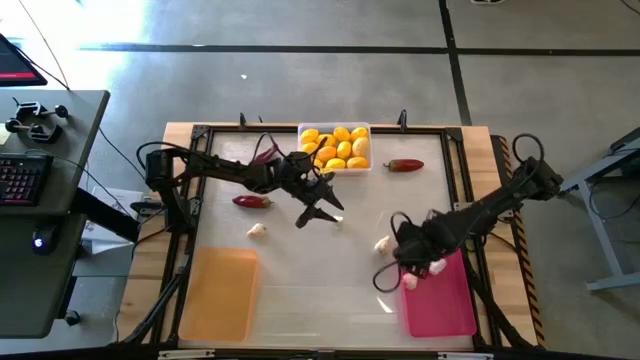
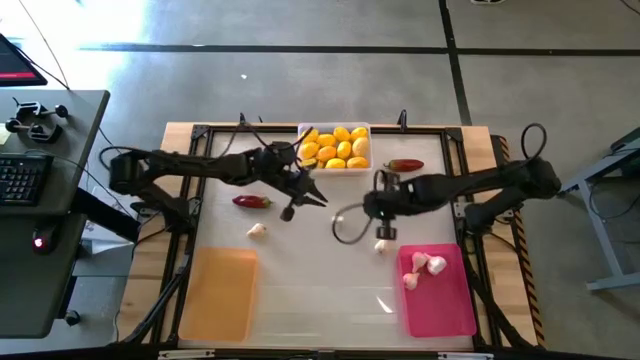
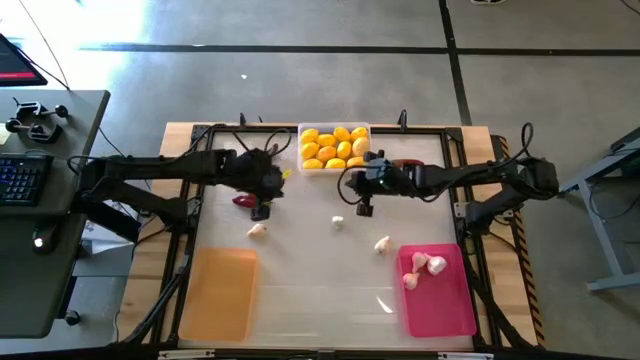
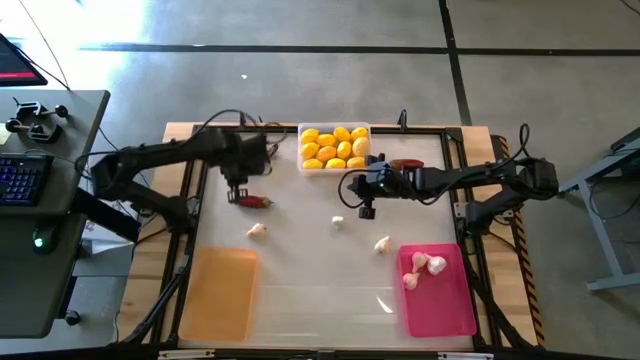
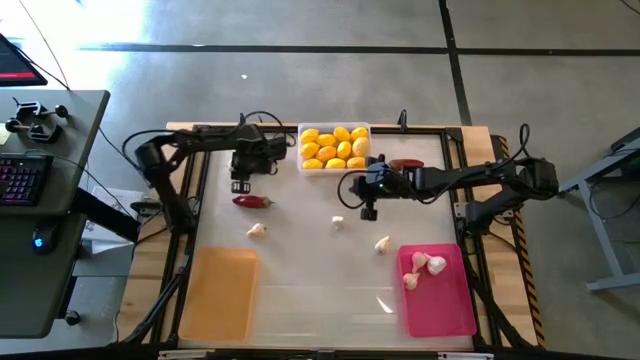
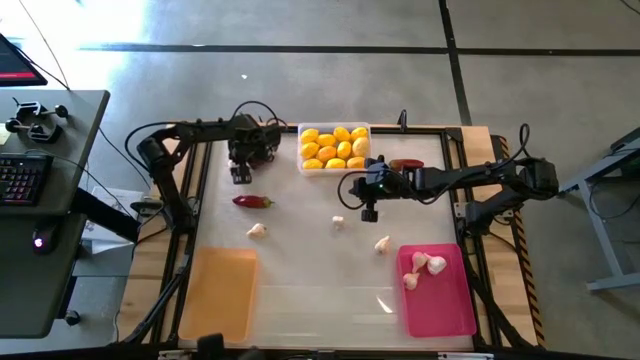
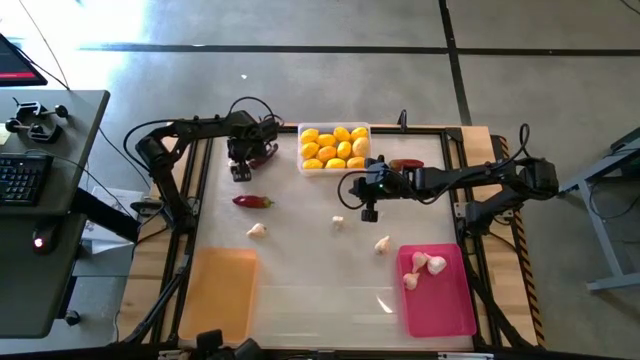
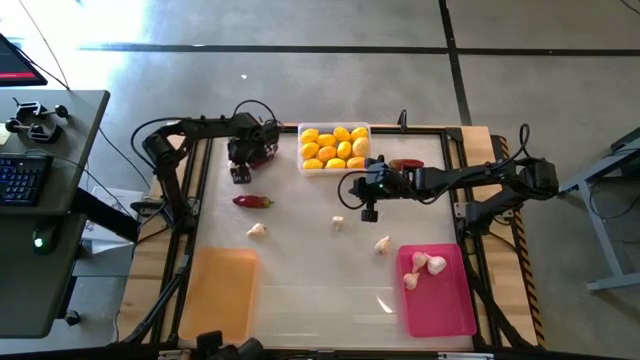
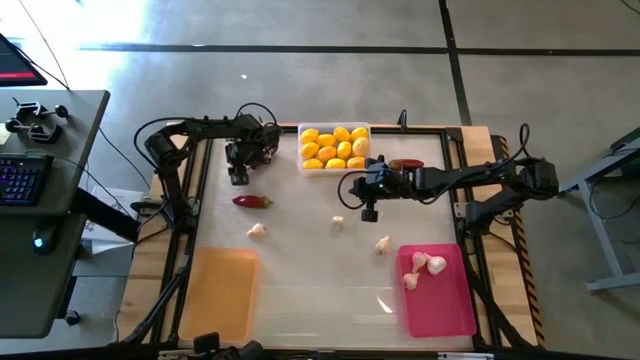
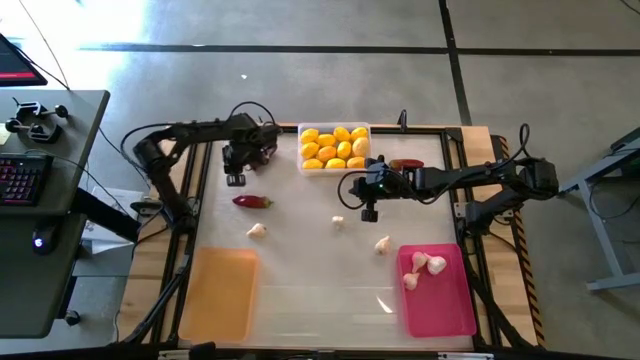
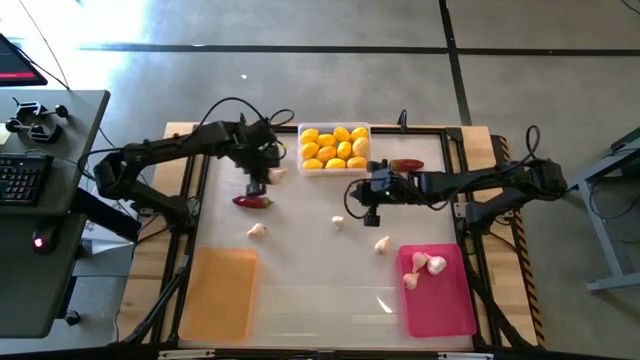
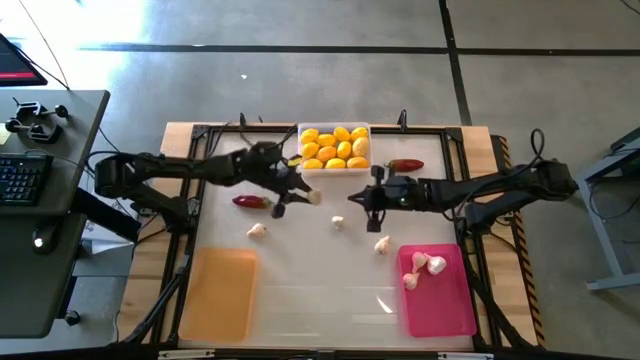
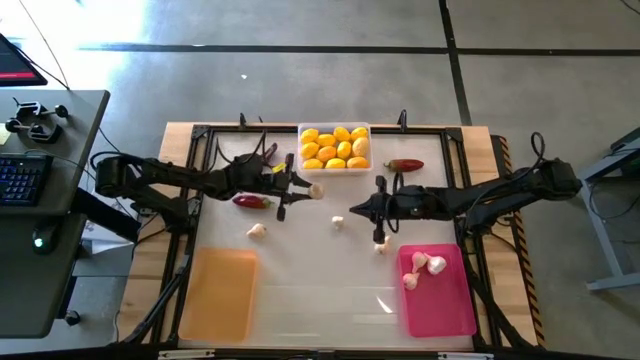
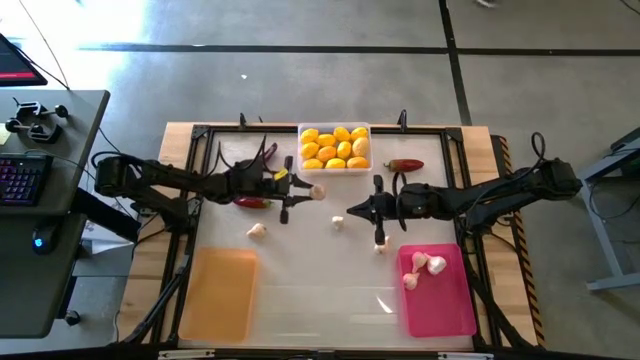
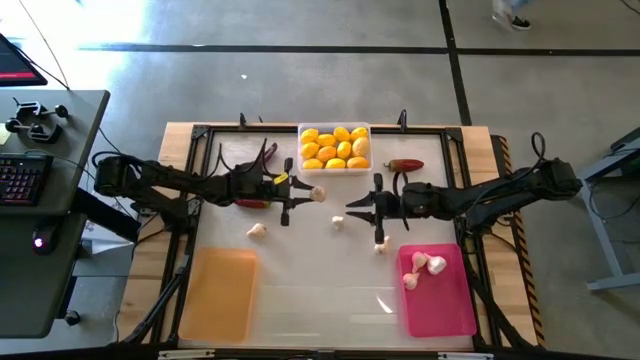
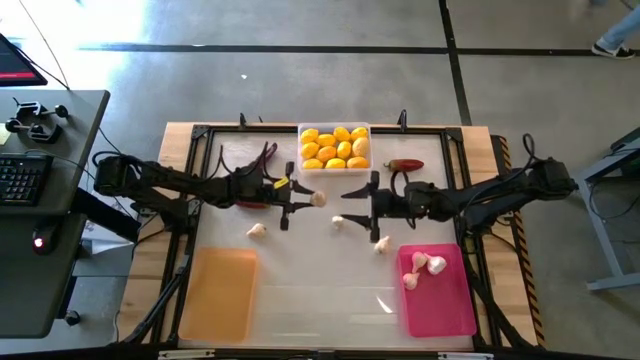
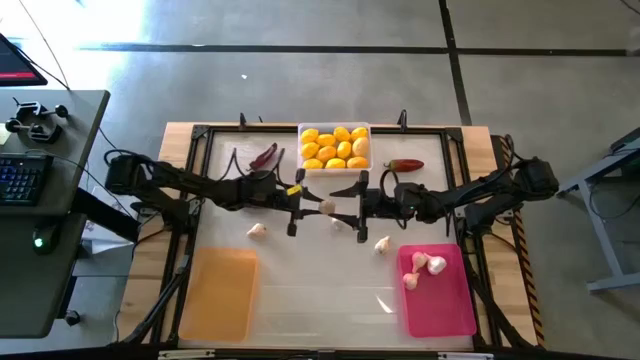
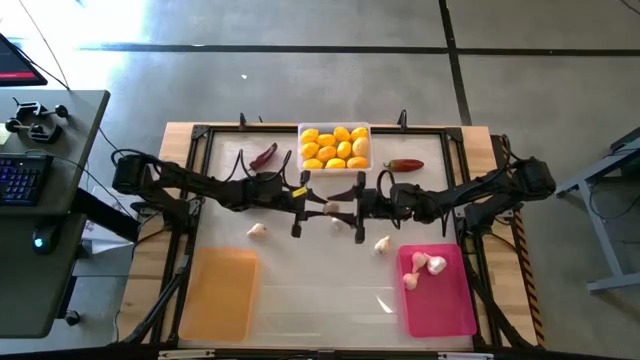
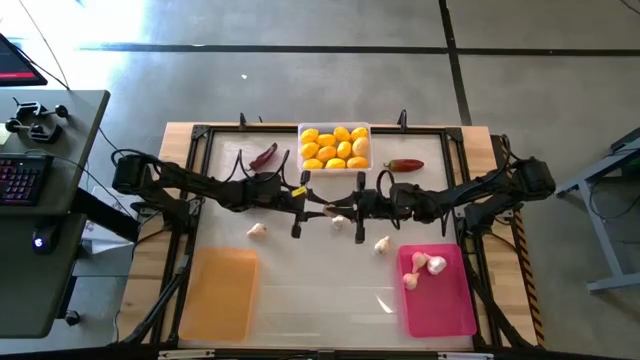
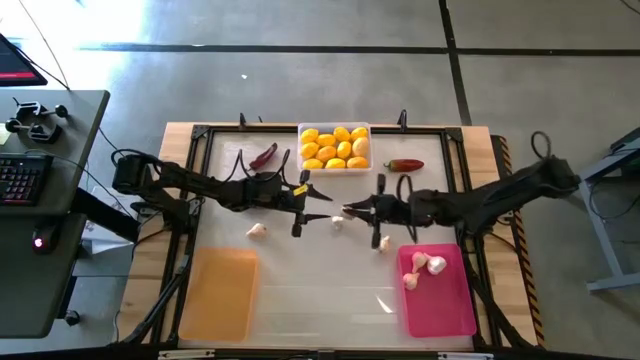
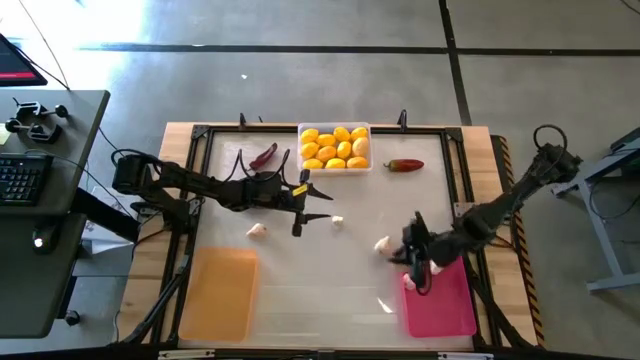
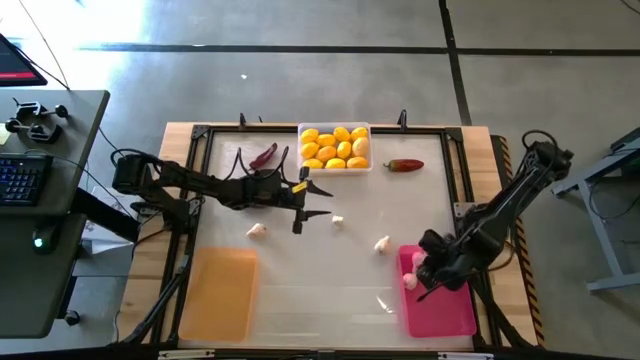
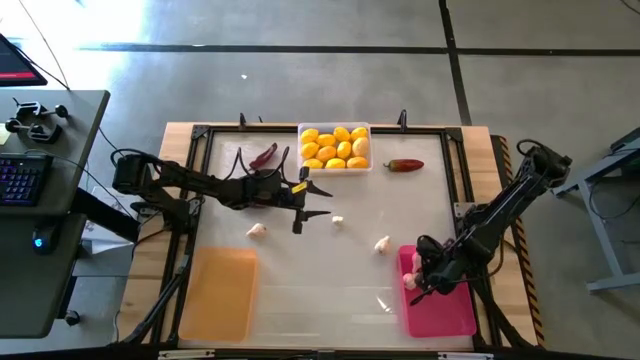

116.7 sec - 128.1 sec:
Task: Sort produce into baskets
Put the top left garlic into the pink bin

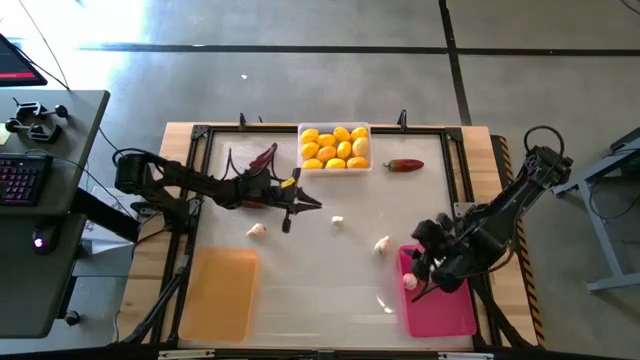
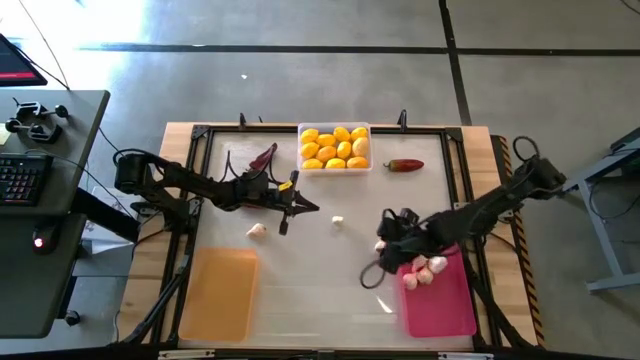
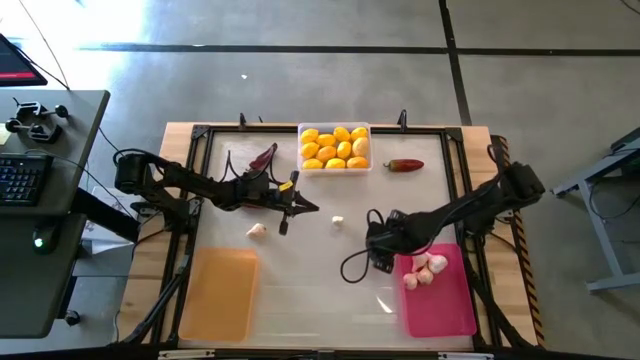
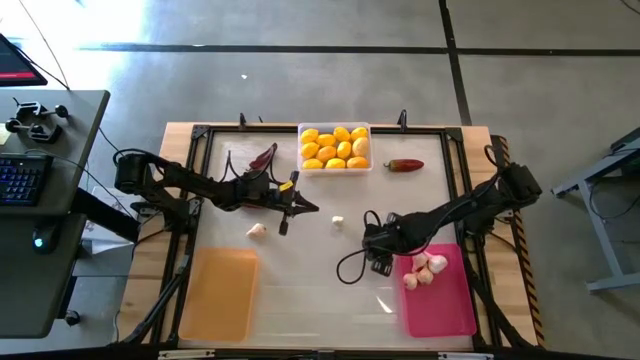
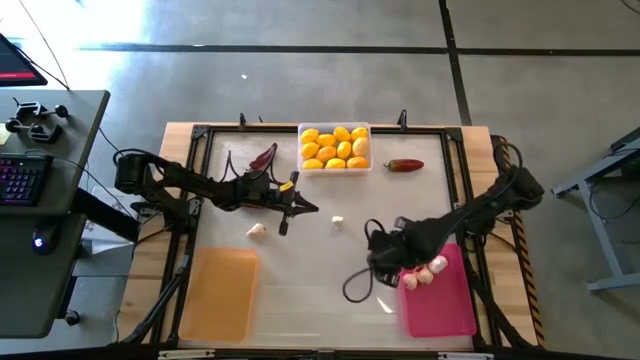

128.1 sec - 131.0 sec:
Put the right garlic into the pink bin

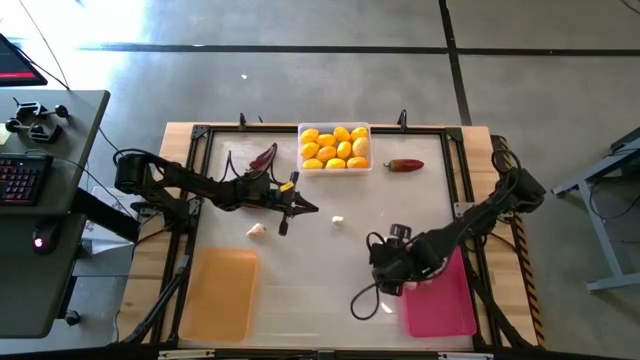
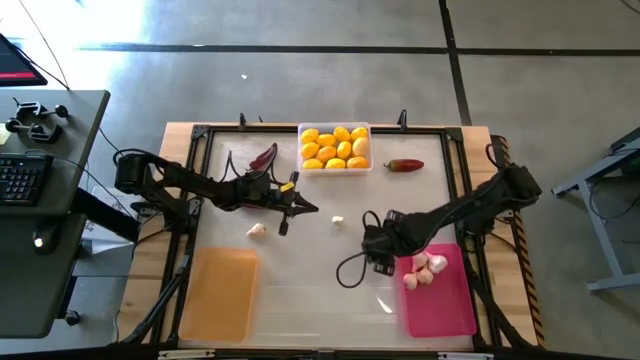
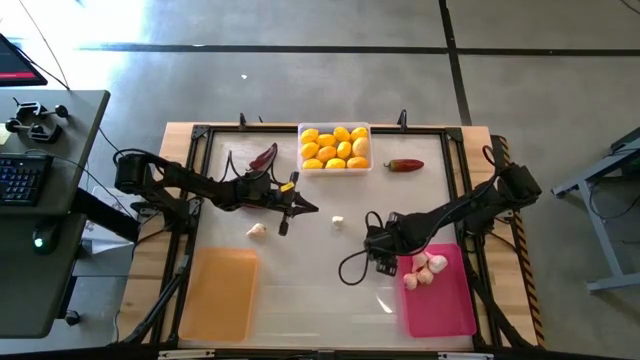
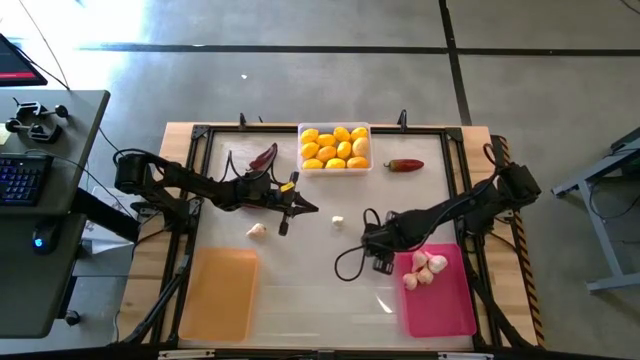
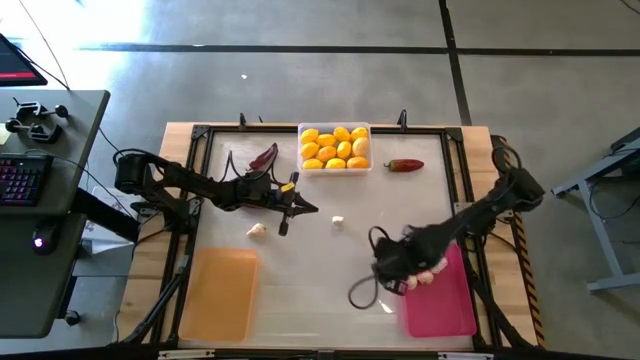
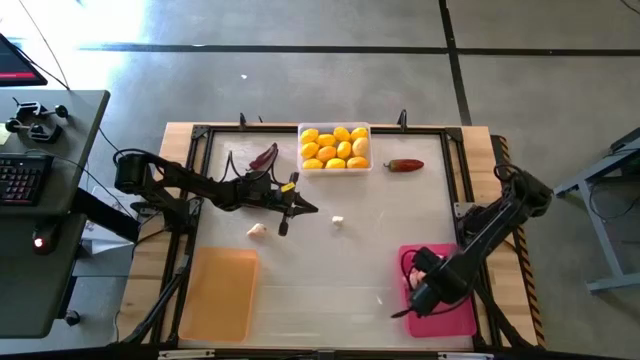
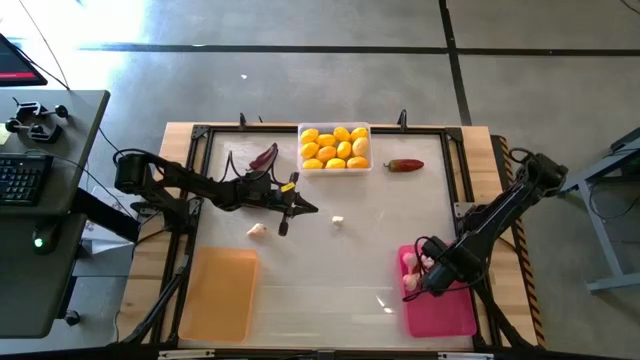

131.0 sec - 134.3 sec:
Put the right garlic into the pink bin

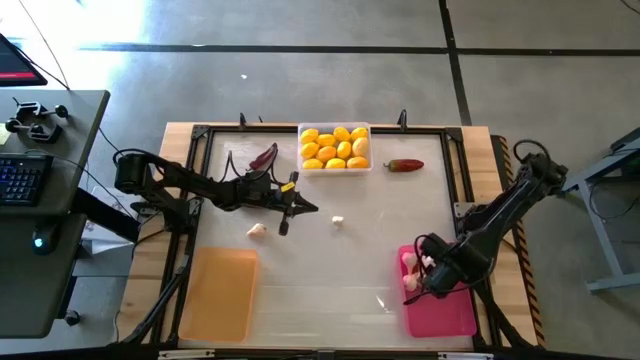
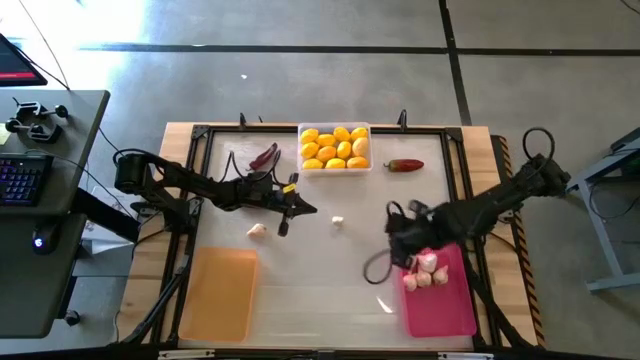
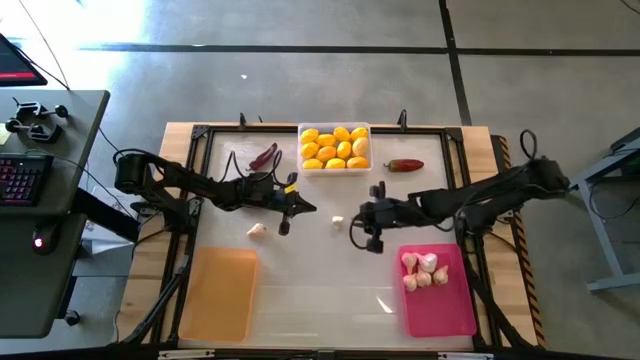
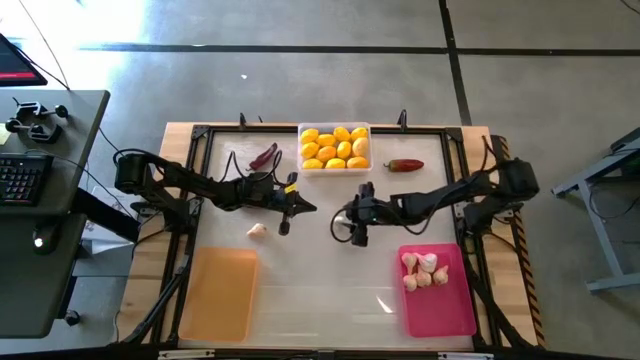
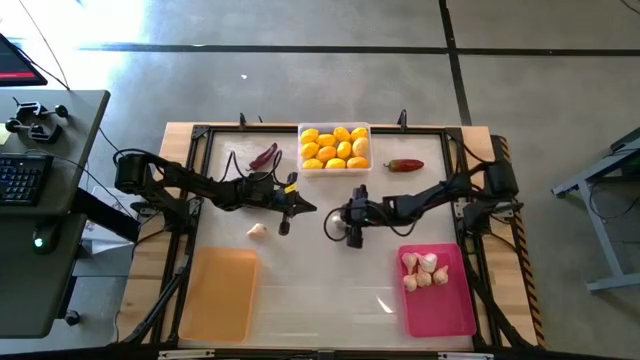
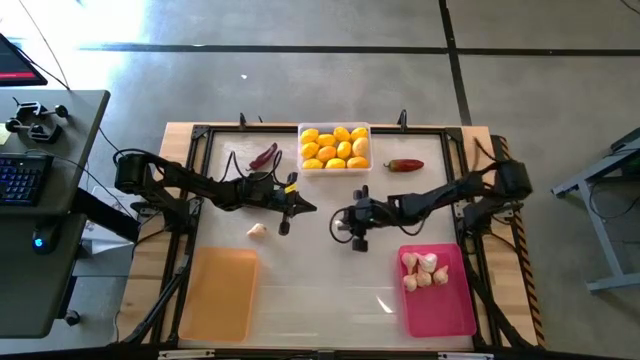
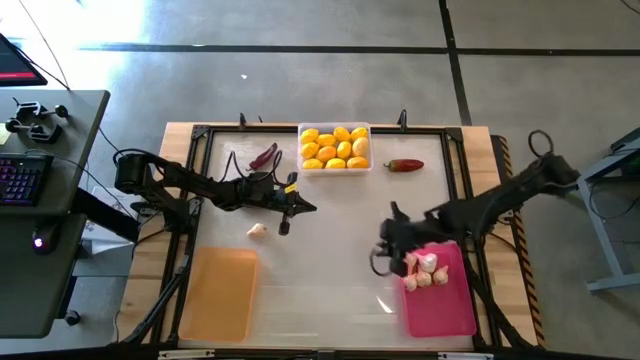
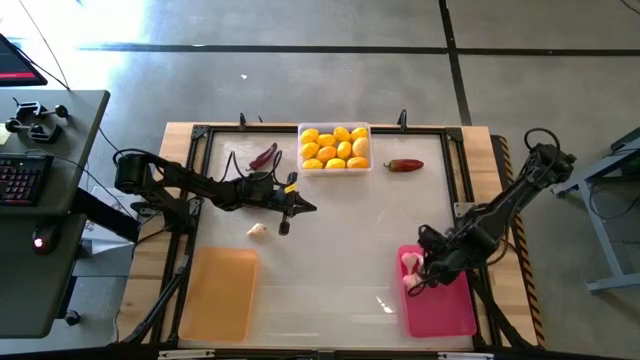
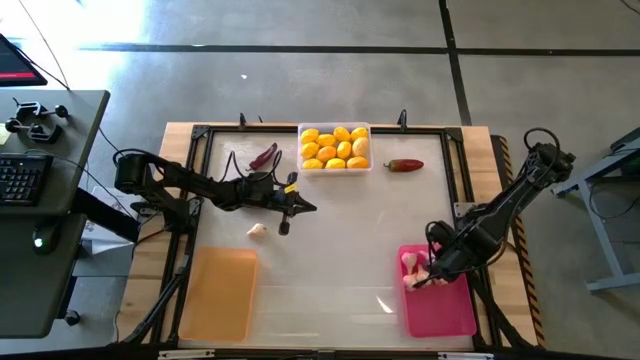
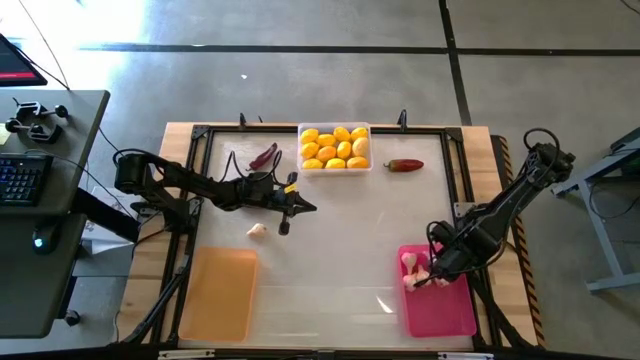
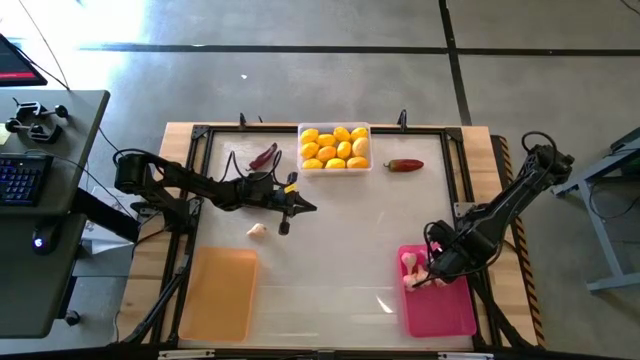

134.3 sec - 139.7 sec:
Put the right garlic into the pink bin
